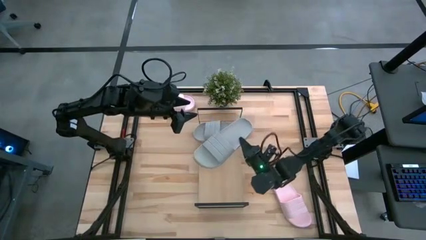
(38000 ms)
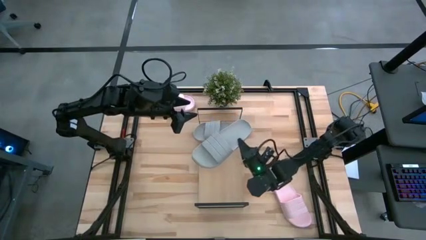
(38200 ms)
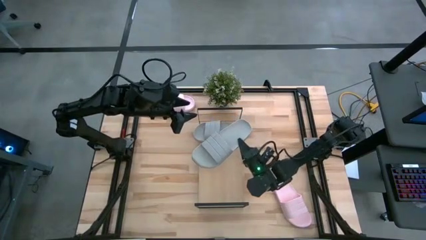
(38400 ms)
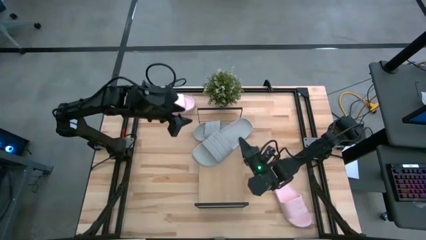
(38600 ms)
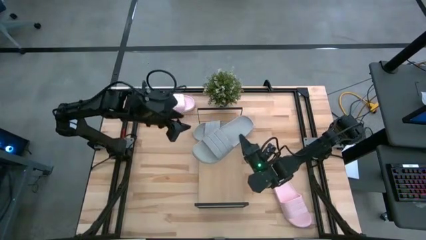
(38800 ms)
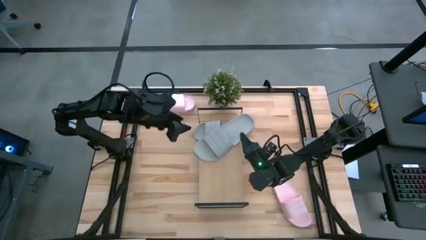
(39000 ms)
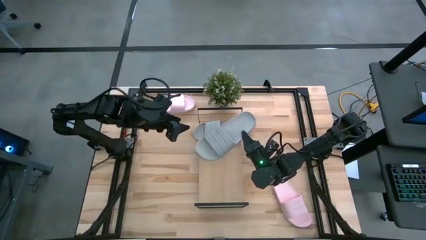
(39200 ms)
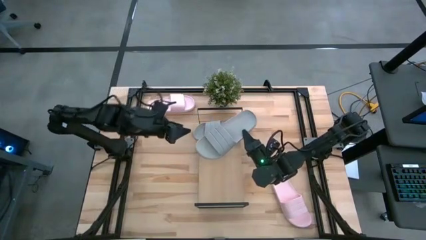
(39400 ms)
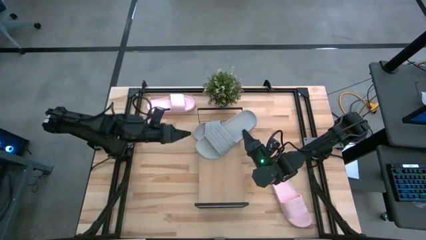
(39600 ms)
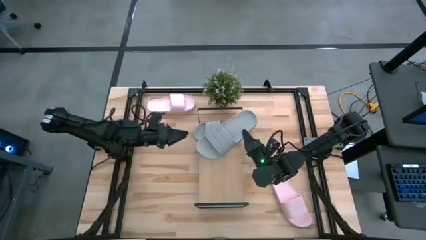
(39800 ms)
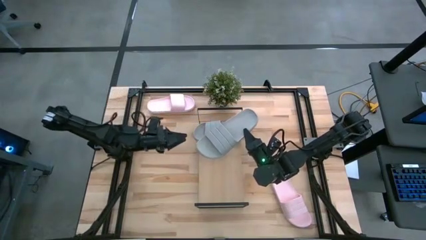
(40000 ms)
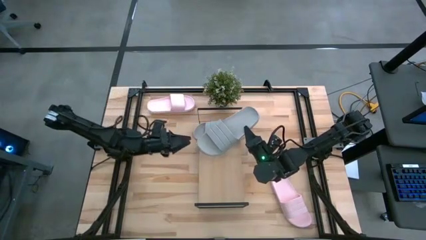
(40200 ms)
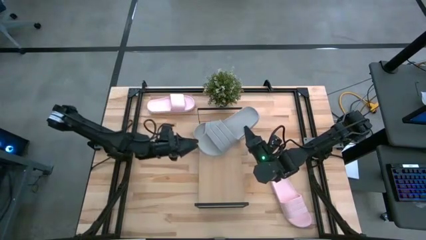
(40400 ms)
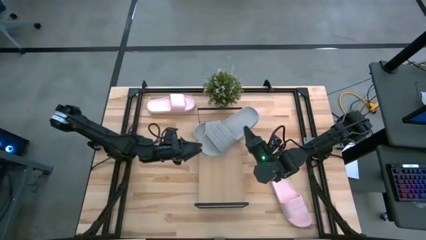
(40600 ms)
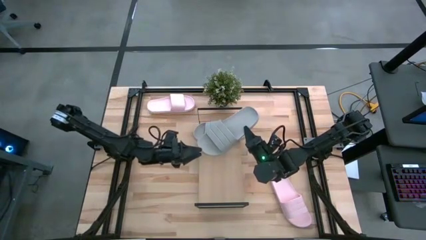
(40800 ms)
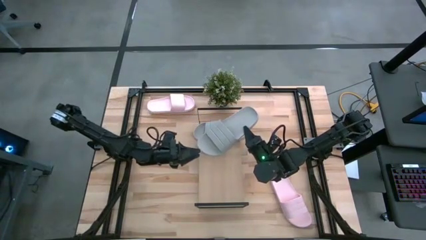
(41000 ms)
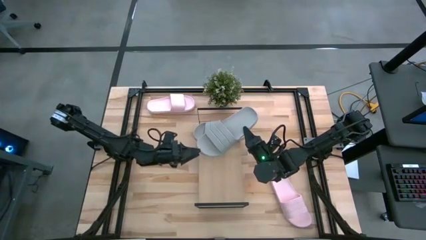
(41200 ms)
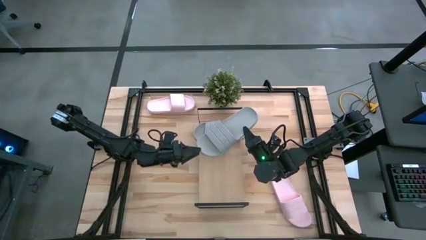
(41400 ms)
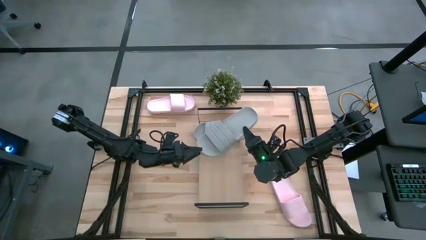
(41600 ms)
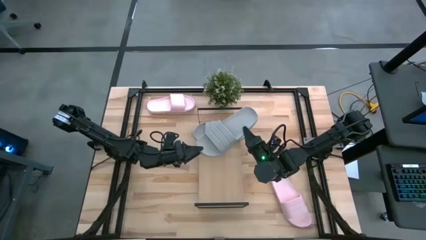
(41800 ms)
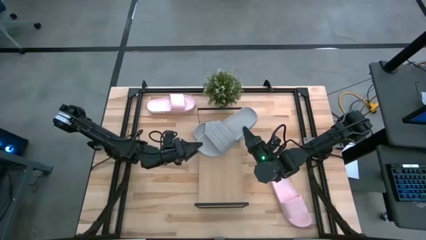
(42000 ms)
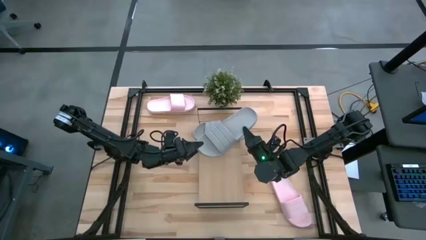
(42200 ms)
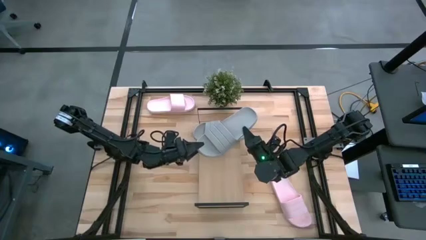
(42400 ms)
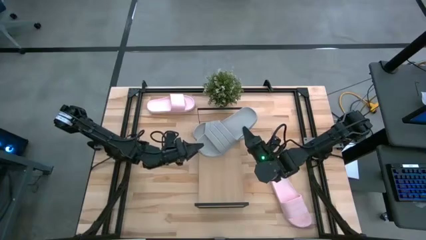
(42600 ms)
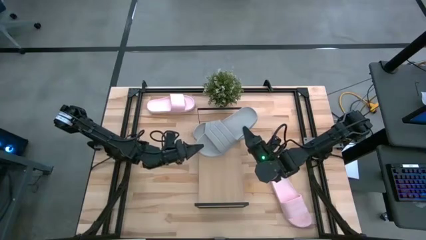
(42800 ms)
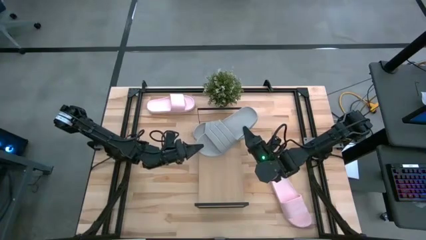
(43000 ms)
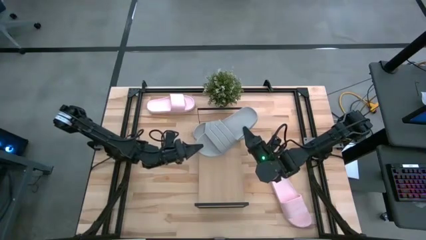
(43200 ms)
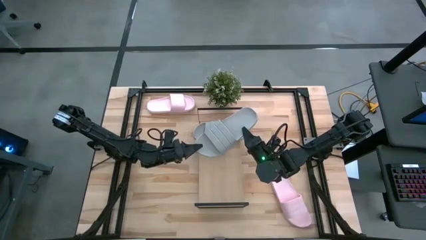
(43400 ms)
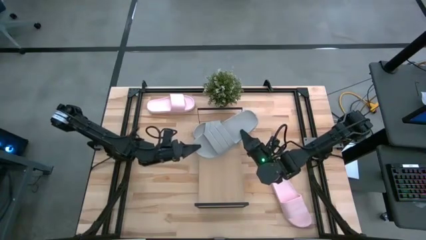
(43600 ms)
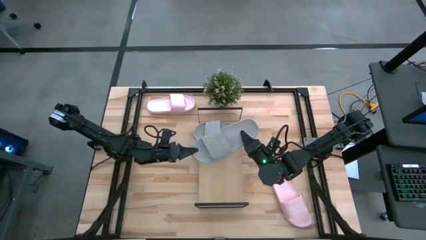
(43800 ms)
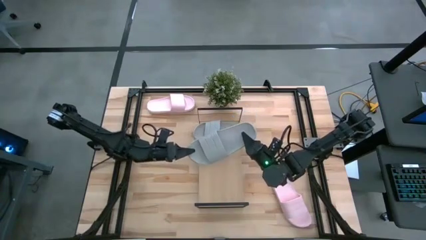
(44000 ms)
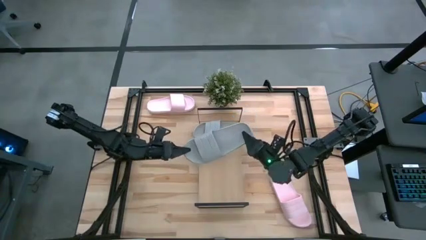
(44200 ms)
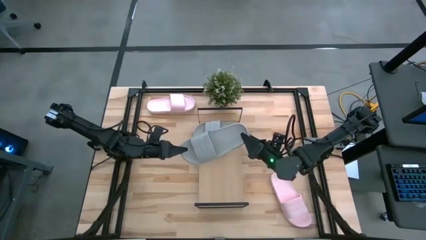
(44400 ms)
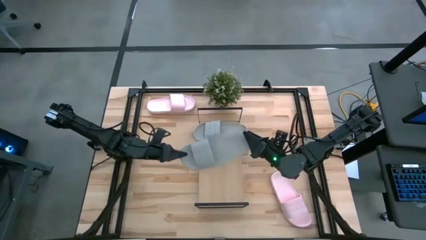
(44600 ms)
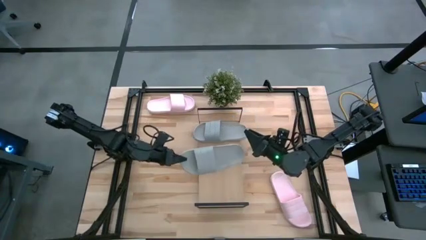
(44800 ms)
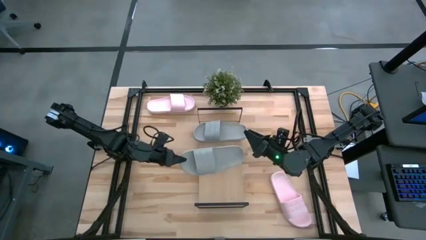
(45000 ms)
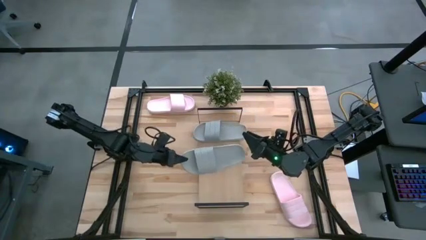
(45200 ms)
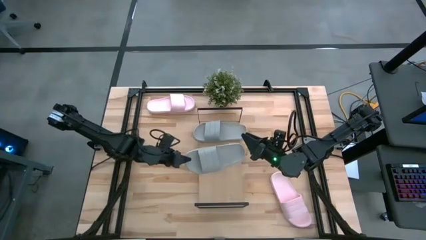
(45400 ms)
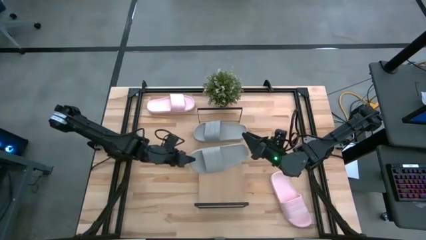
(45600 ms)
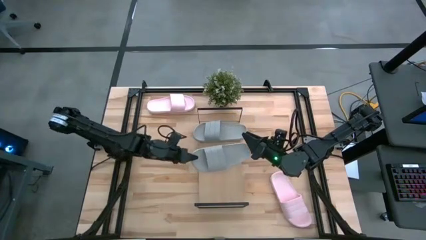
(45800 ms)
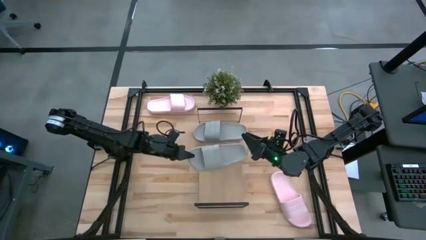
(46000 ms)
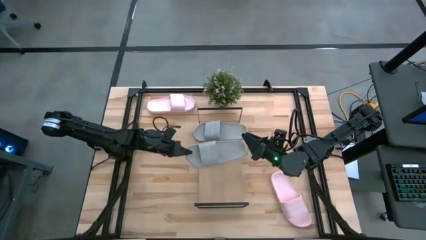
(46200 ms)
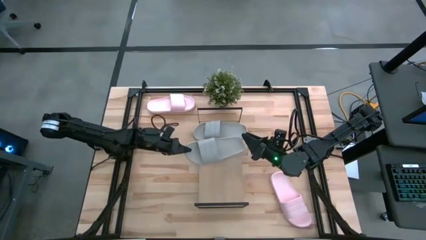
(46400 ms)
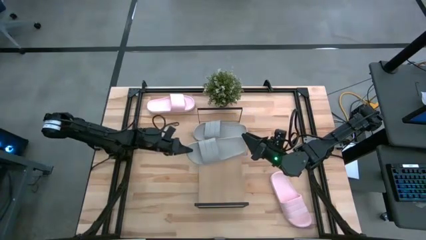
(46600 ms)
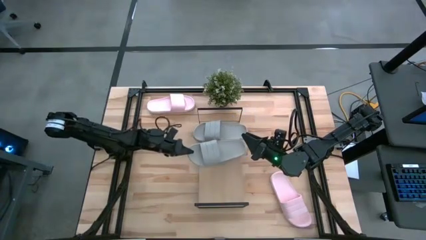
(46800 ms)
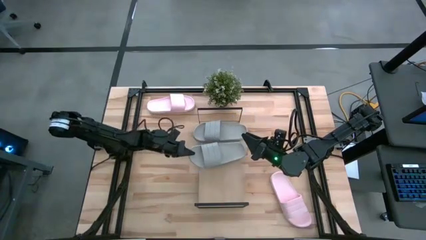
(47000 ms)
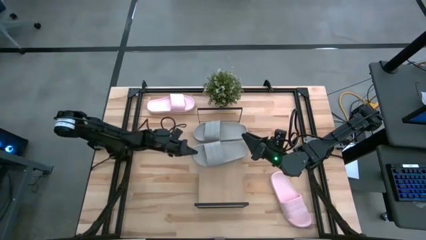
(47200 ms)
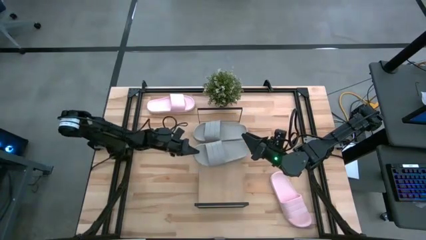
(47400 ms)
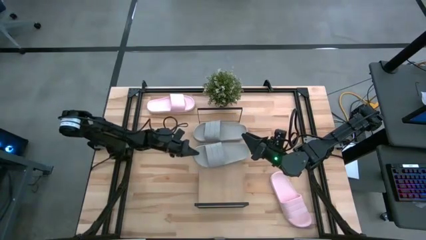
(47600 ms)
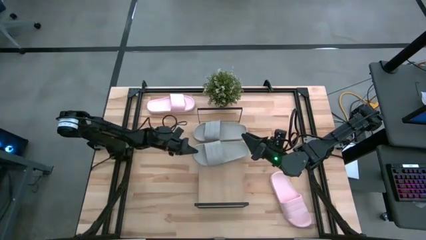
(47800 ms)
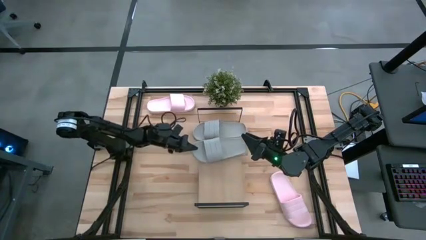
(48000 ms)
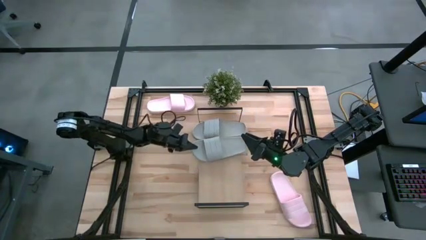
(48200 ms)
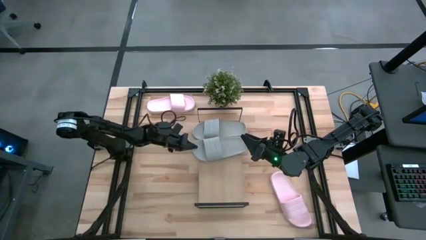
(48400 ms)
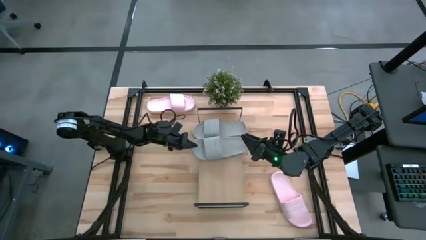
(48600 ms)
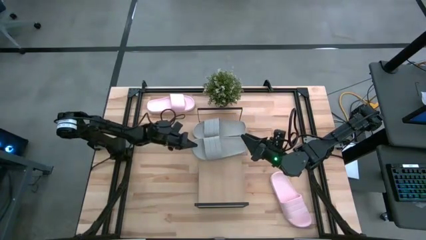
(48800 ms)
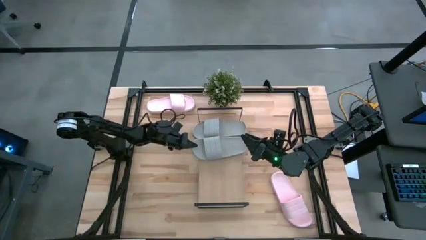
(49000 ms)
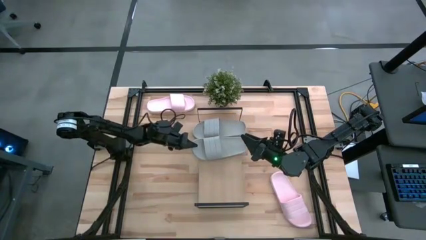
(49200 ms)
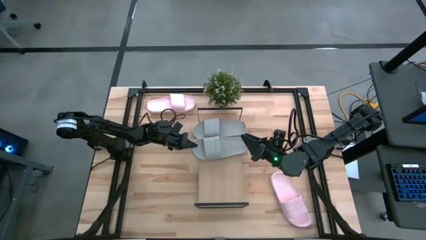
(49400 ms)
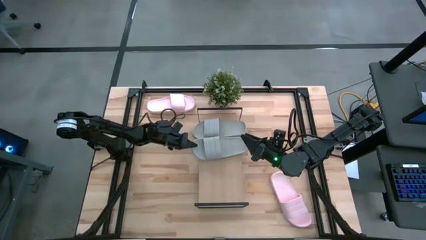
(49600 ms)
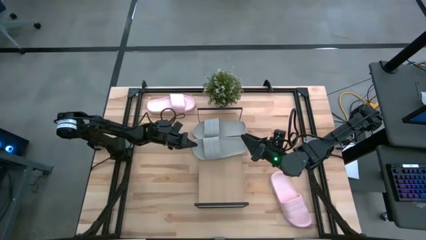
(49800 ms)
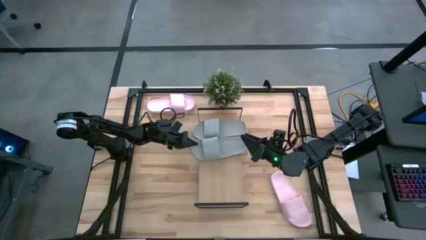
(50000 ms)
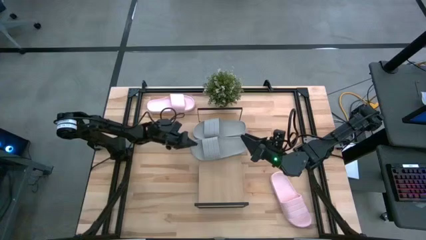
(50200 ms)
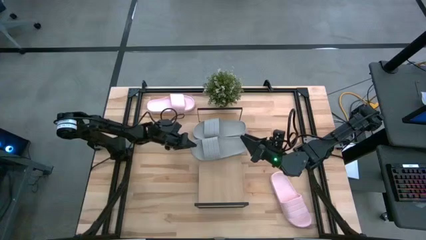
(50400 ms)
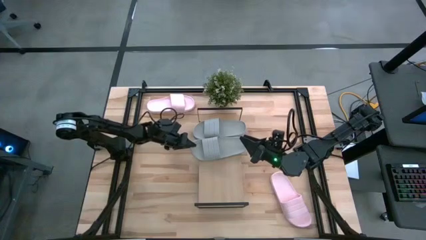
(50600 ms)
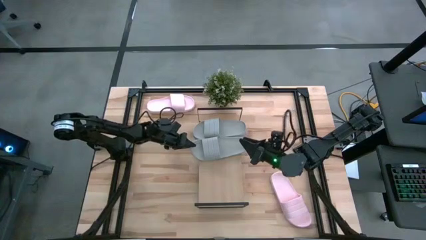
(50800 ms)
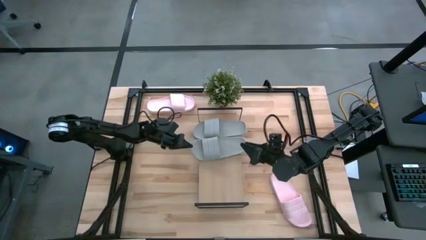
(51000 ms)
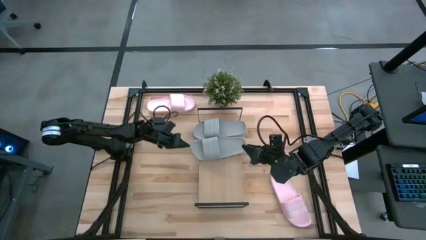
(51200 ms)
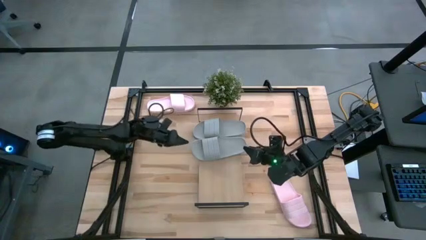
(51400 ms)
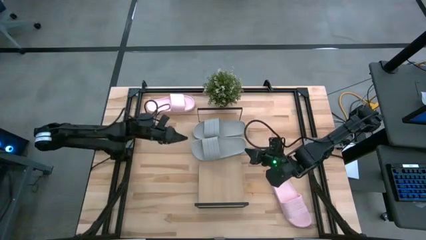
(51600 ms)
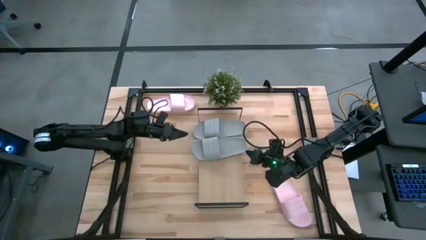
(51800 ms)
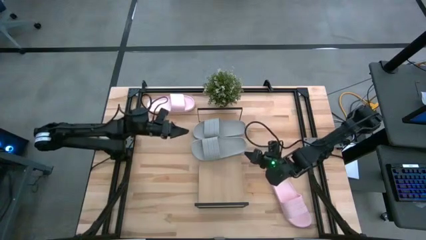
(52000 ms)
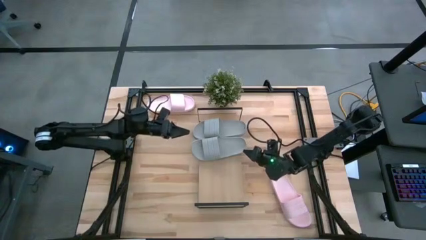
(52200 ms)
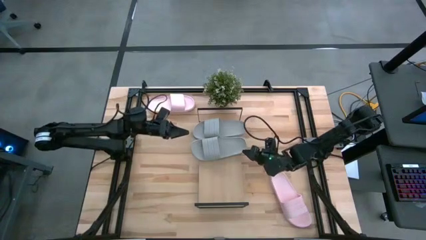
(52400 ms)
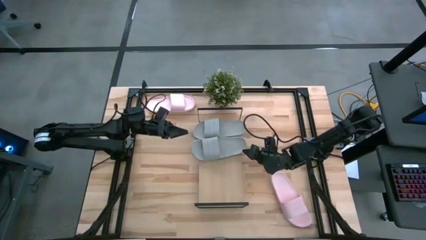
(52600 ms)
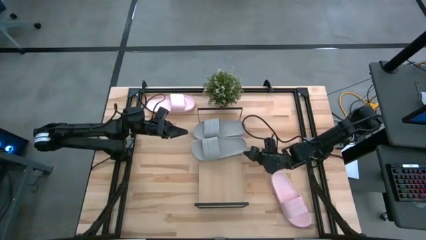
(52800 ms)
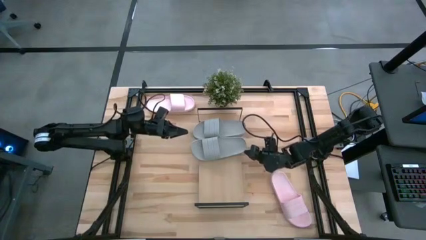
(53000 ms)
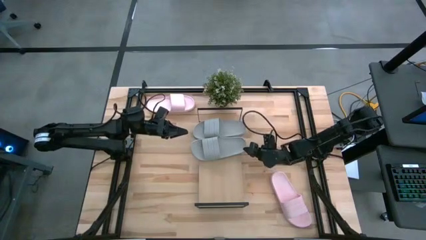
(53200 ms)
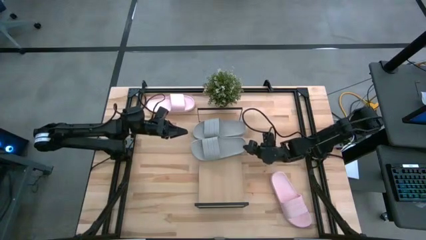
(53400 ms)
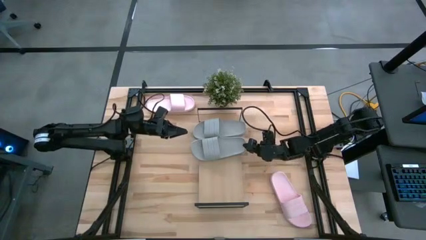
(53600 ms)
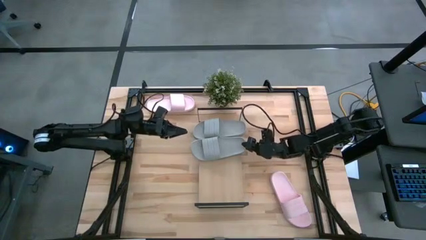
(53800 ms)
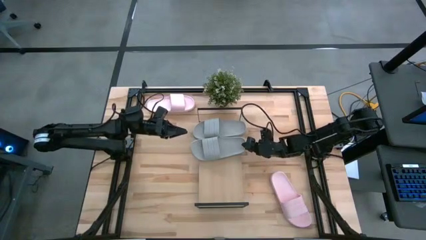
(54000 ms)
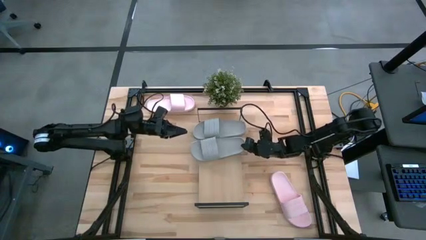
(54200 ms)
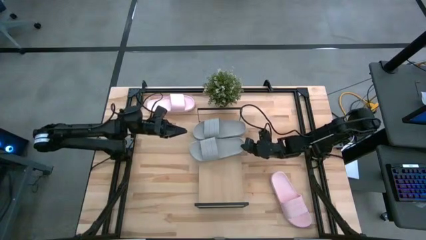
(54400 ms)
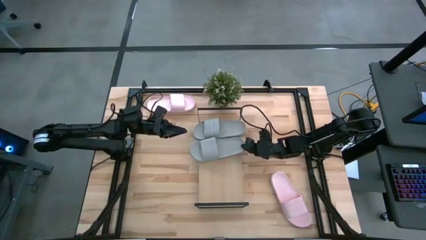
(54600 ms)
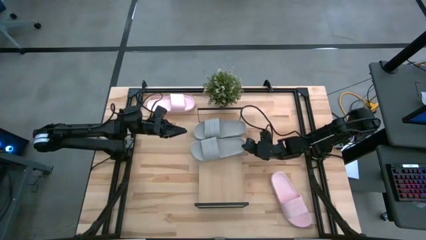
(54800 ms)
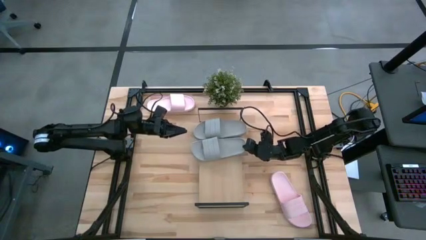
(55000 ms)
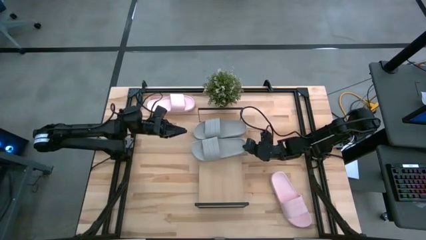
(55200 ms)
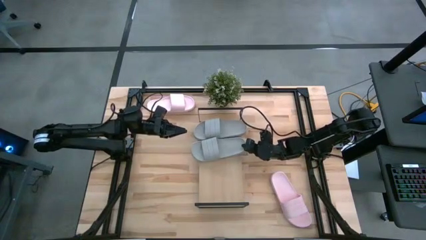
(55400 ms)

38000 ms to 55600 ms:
Task: Pick and place slides into the shelf
Put the gray slide on the shelf
